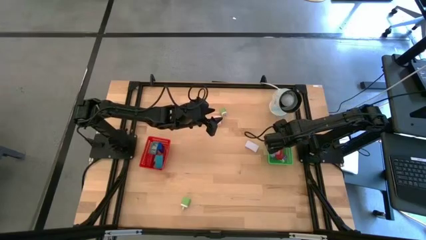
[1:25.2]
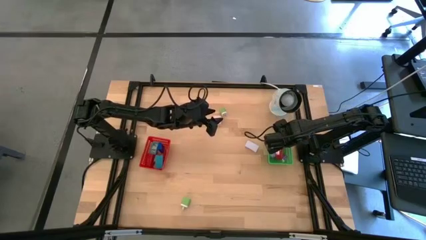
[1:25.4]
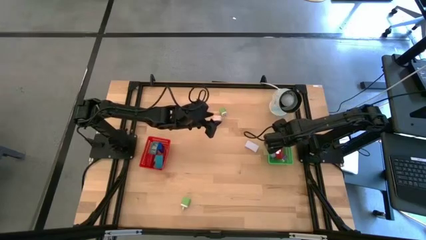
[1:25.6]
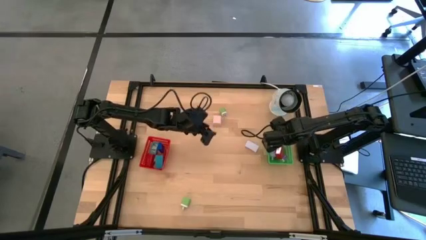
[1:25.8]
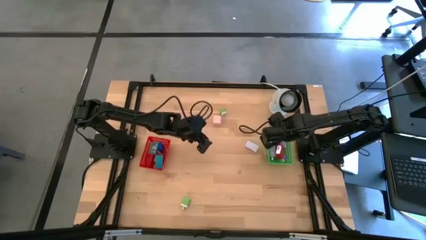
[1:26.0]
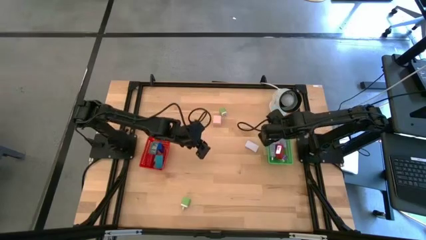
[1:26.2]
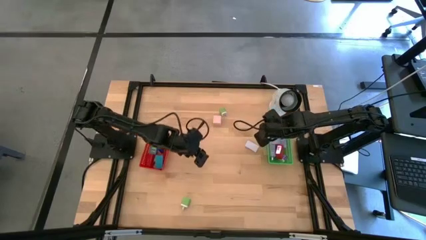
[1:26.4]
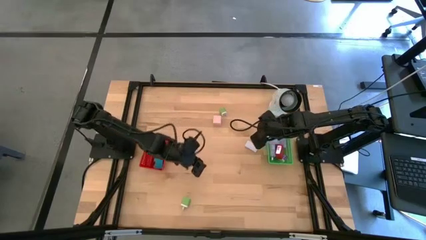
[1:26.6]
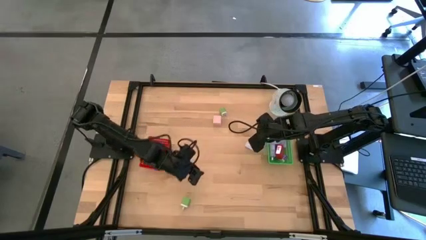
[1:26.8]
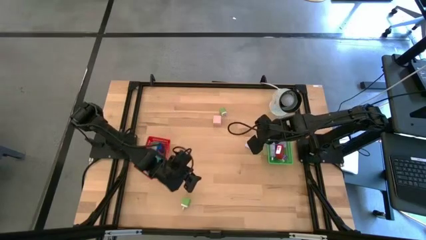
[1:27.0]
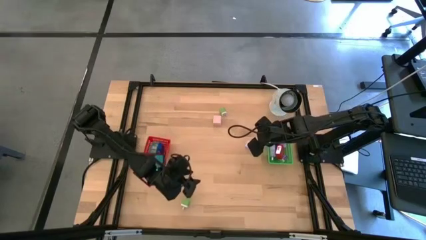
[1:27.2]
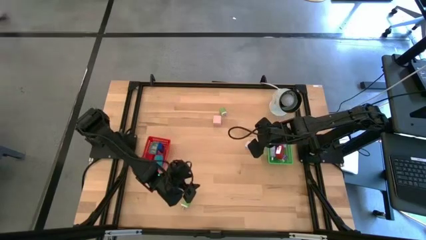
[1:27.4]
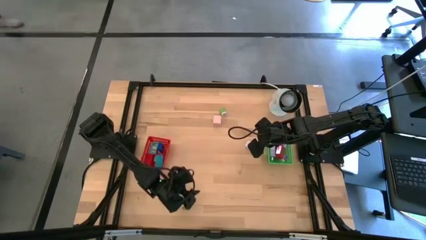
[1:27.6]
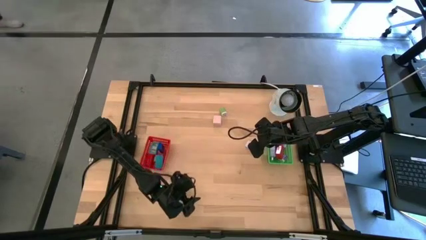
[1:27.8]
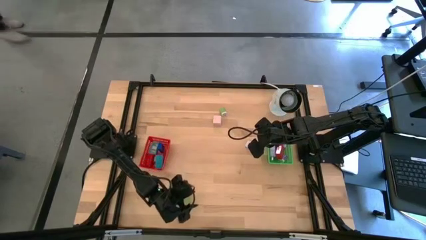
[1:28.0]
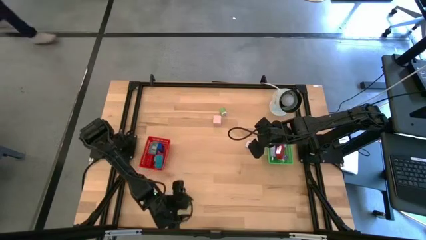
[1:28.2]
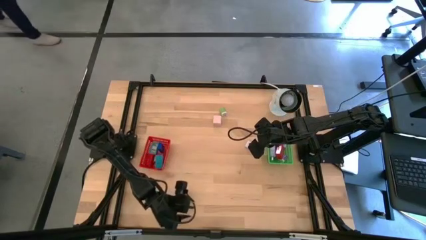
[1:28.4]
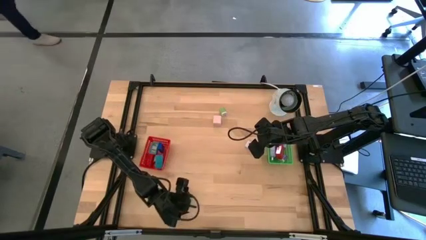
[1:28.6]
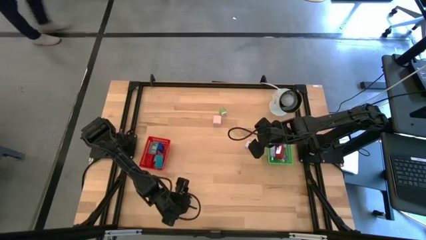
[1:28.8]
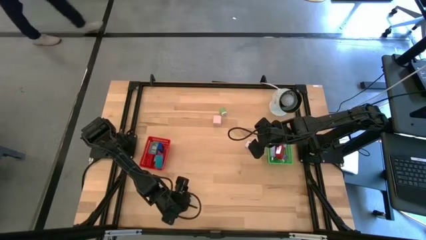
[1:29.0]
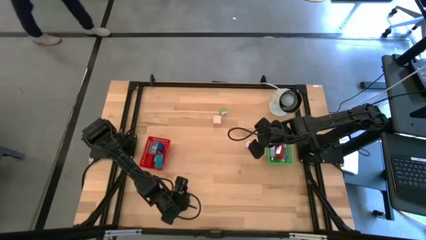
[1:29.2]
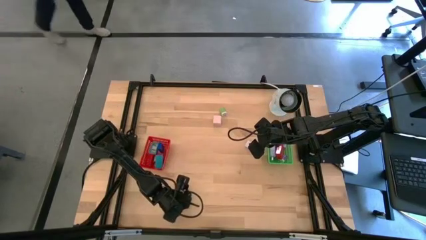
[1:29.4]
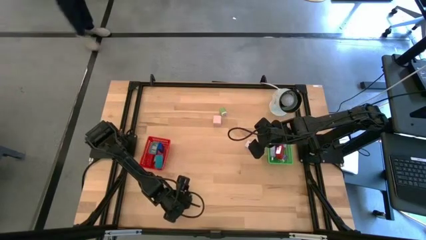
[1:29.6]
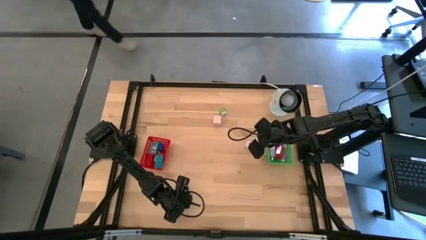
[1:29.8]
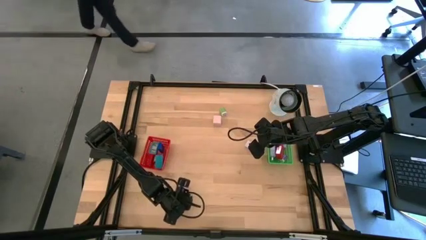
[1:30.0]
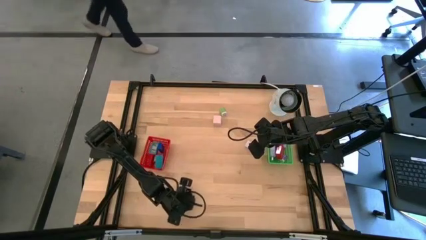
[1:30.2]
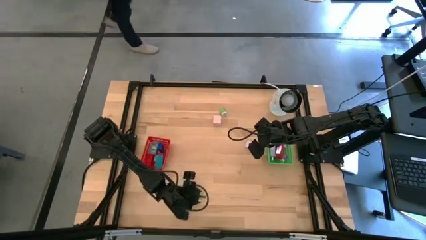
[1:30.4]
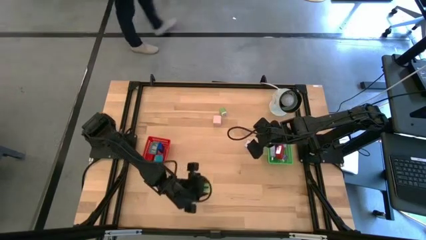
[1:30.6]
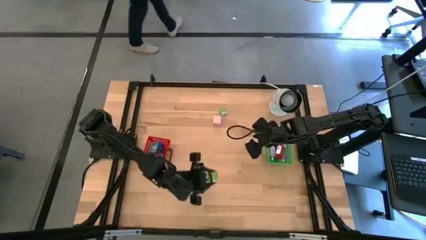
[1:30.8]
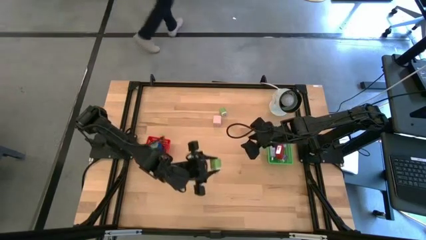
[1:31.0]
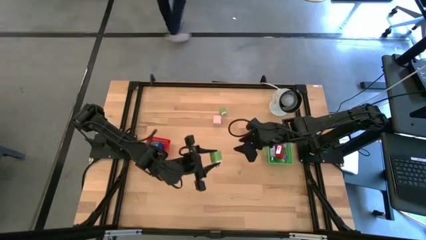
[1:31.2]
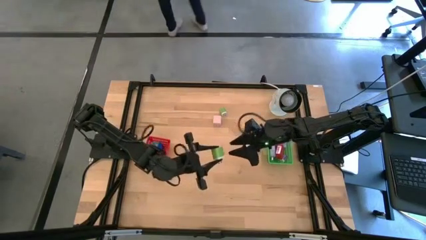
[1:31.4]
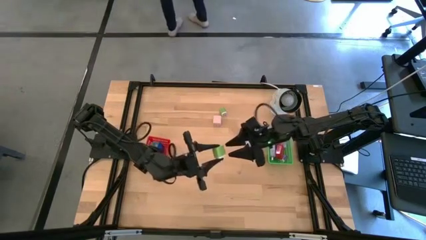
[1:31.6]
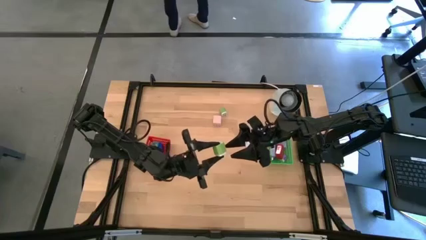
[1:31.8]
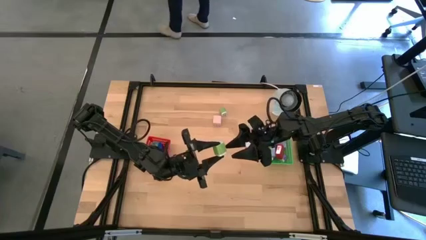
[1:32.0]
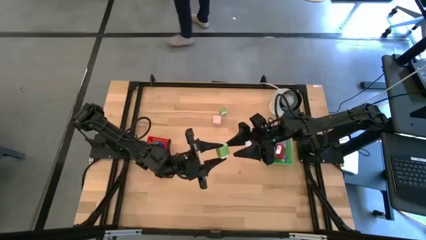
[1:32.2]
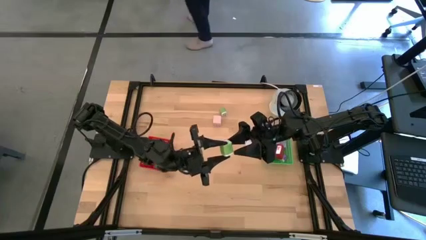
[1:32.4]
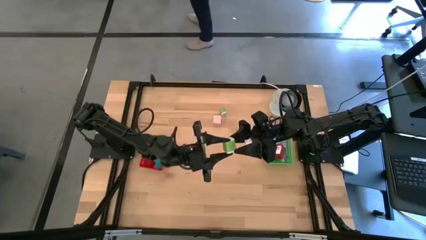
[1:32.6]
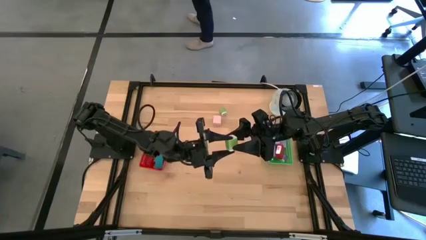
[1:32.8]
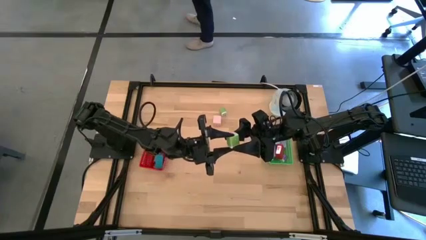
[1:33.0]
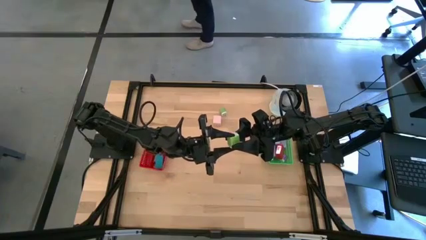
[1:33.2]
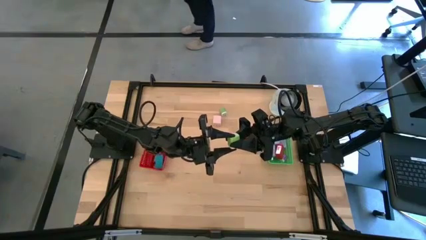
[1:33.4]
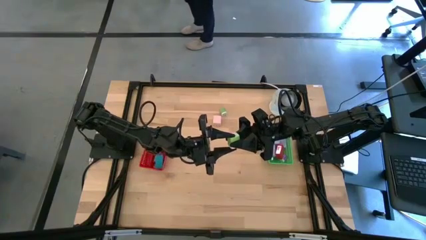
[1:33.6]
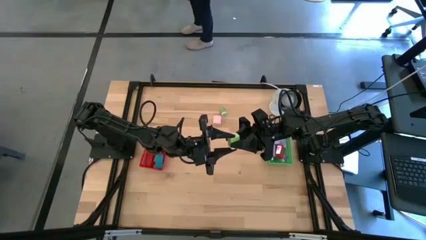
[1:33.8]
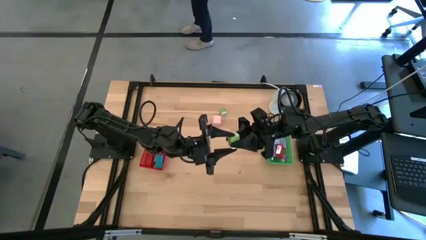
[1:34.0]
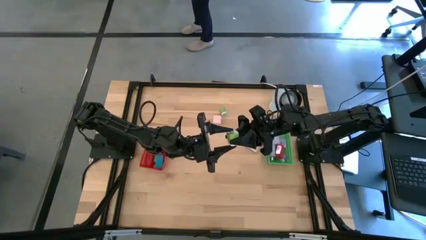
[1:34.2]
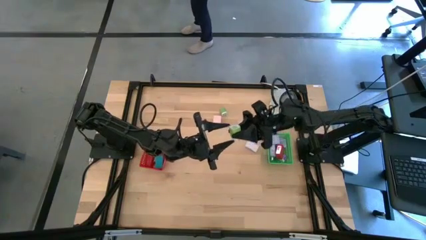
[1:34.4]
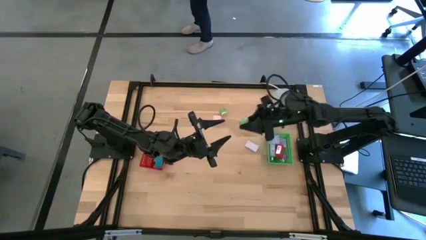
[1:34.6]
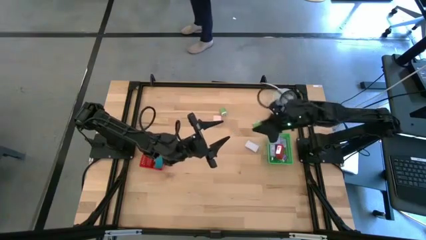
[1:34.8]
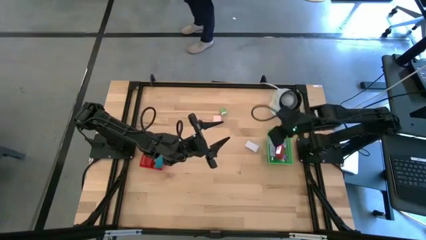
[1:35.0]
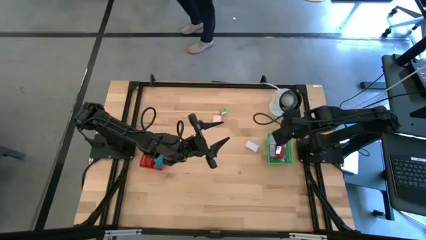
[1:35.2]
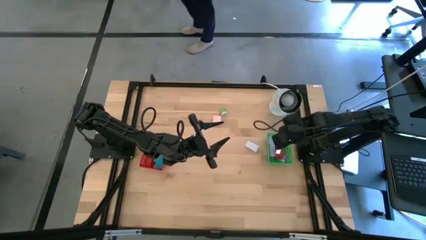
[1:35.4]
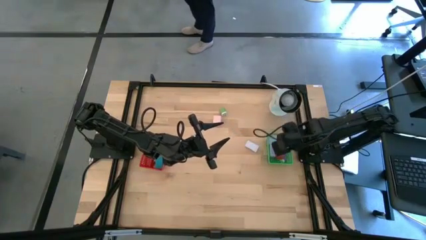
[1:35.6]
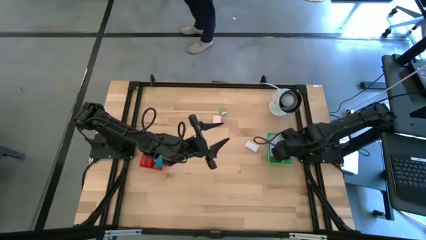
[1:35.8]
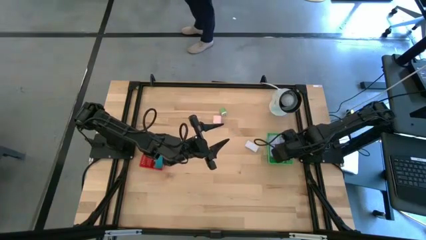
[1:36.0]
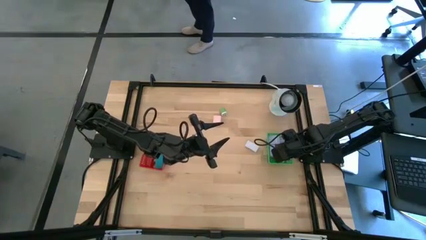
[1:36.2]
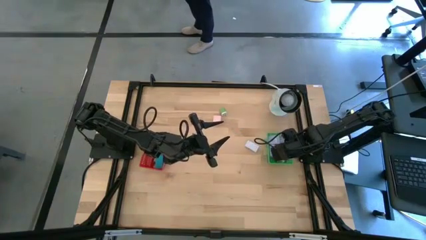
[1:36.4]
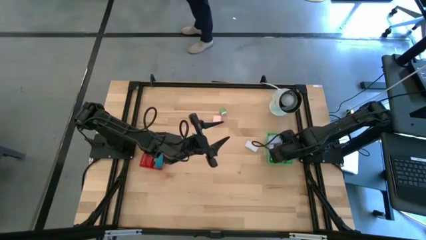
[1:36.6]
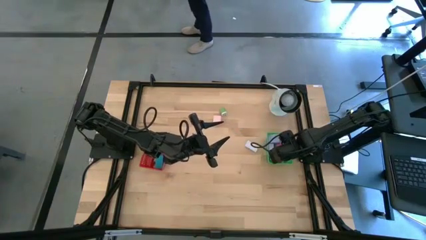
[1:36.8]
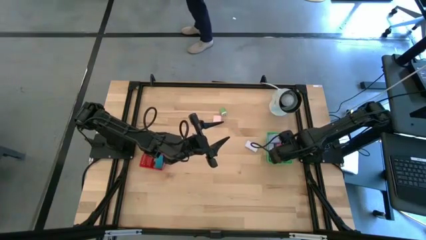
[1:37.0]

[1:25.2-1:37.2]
Task: Pick & Place Office items
Put the bottom green charger adapter into the green basket

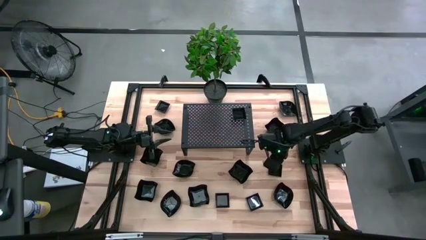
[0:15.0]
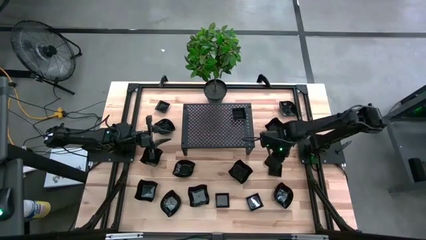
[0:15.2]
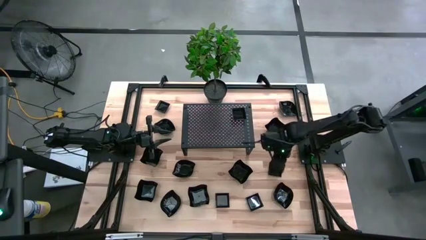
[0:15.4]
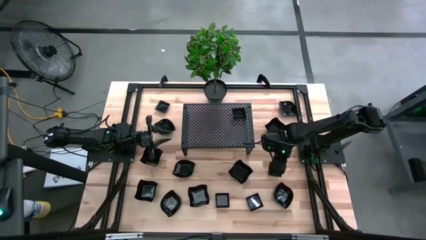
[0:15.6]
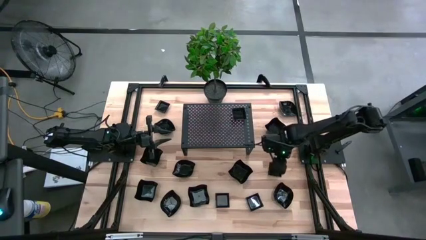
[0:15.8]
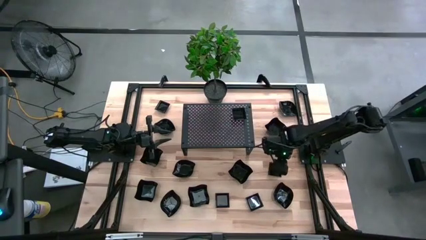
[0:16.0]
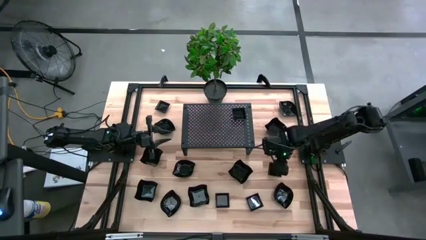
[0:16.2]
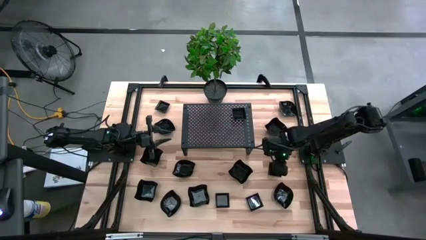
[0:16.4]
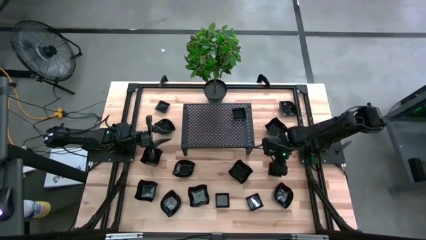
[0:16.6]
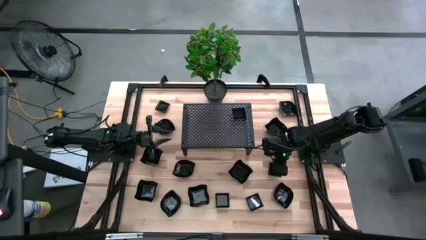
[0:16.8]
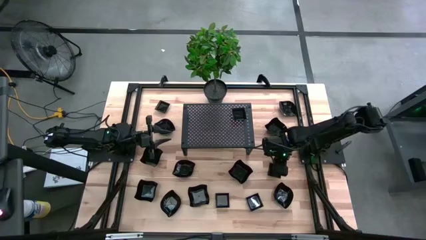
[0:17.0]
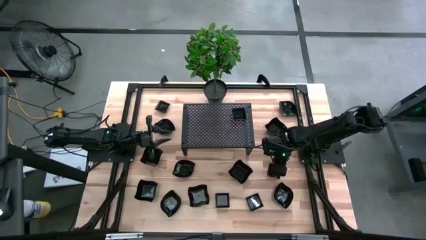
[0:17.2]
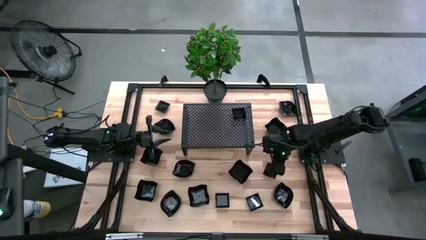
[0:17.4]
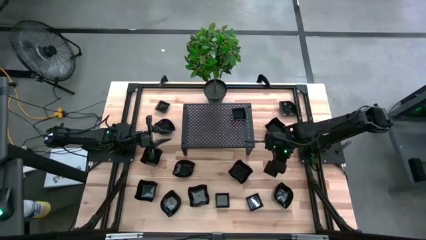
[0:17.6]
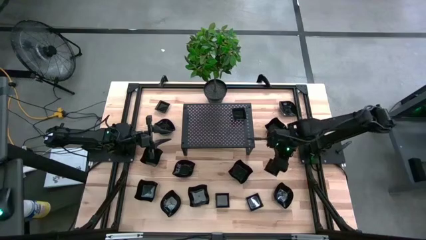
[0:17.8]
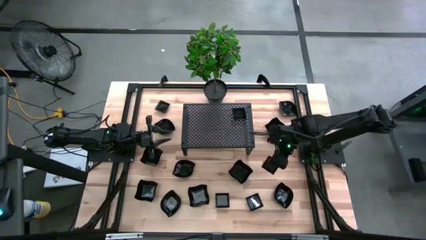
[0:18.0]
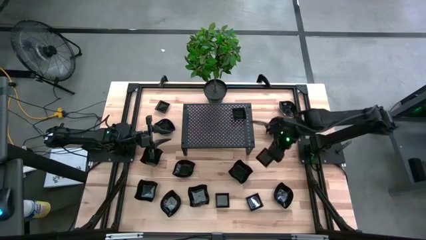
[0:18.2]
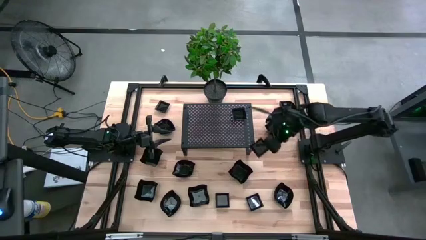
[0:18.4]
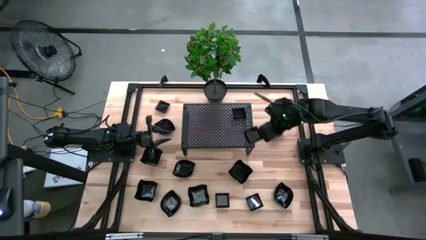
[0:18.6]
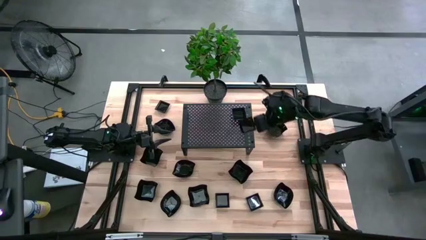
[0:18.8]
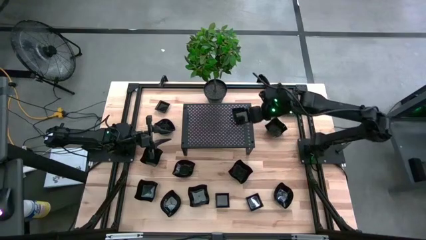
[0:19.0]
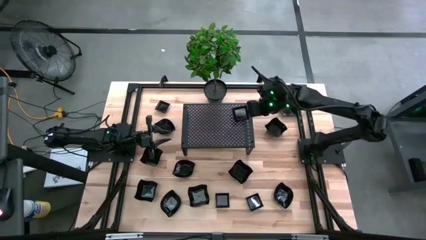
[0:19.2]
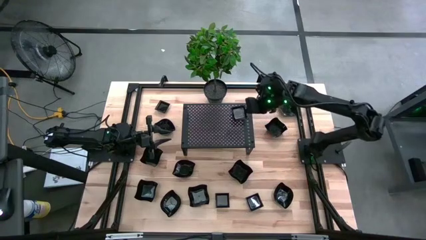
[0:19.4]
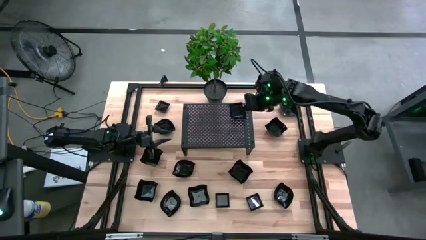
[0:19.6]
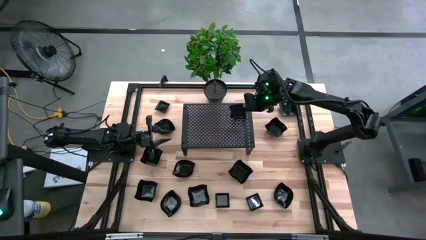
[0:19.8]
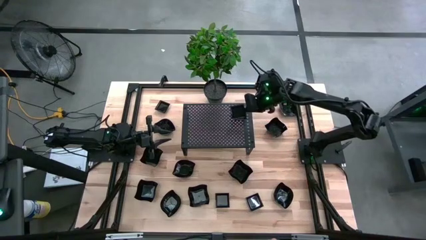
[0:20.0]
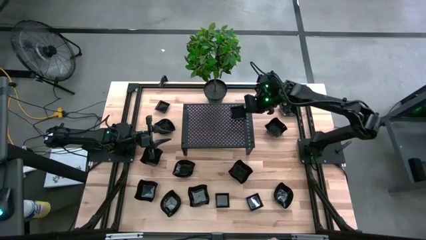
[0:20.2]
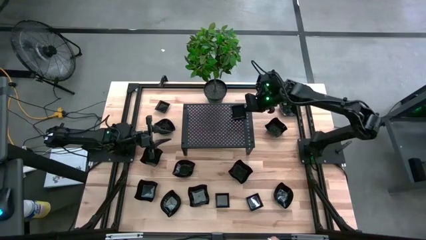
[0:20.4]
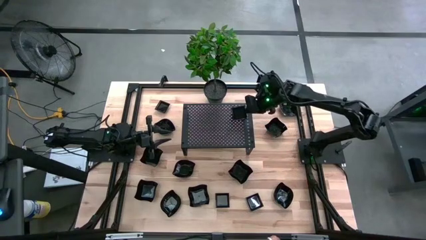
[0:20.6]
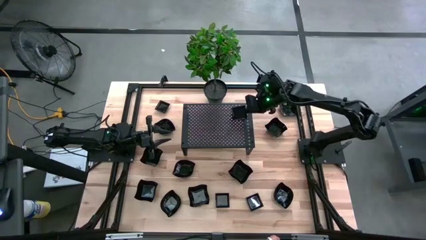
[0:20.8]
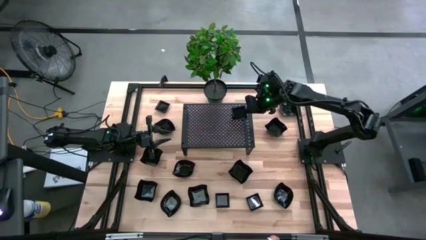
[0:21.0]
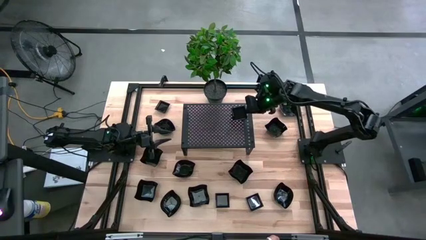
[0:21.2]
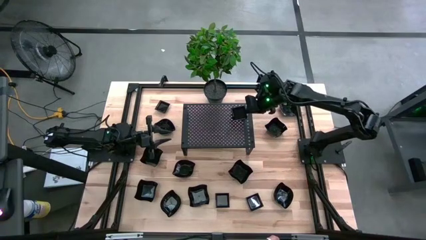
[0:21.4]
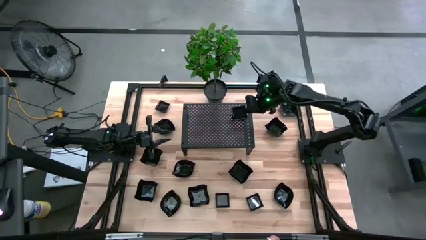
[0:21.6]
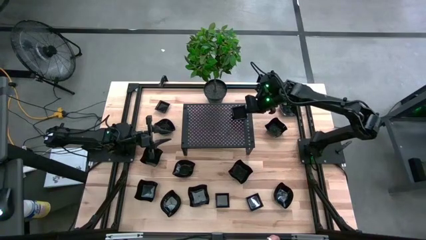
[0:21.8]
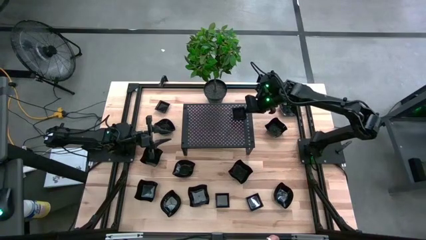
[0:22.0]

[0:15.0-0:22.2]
Task: Pick & Place Mini shaped plates
Stack the black square plate on top of the other black square plate on the shelf
